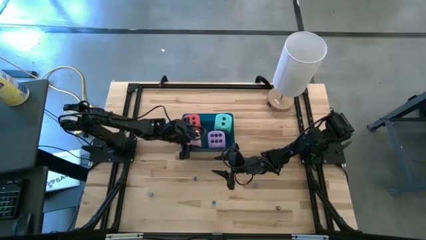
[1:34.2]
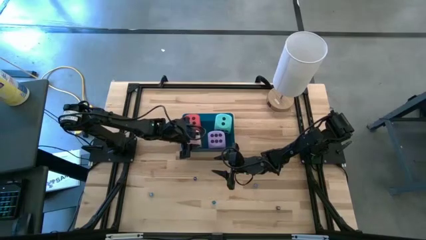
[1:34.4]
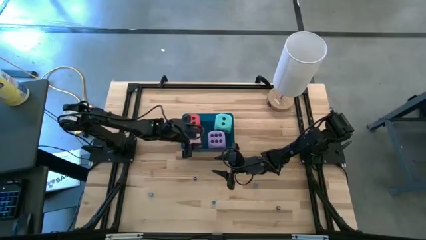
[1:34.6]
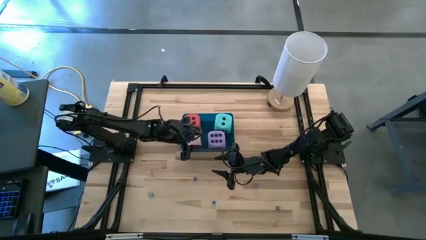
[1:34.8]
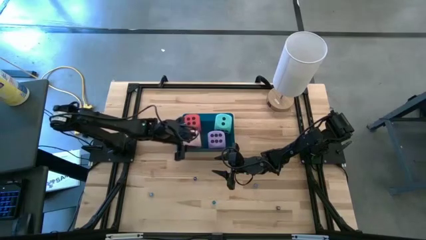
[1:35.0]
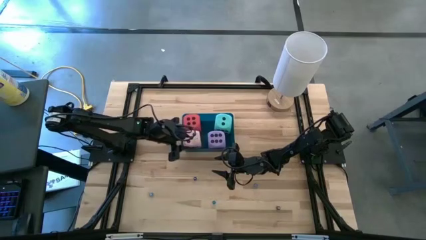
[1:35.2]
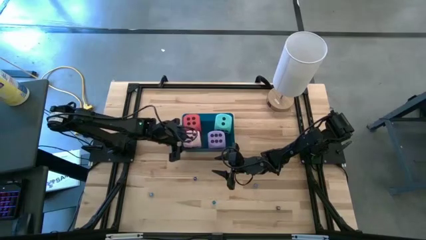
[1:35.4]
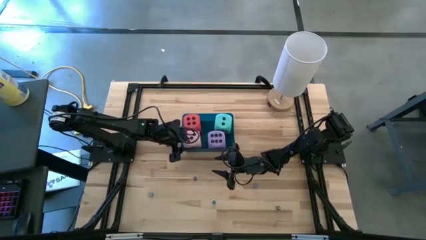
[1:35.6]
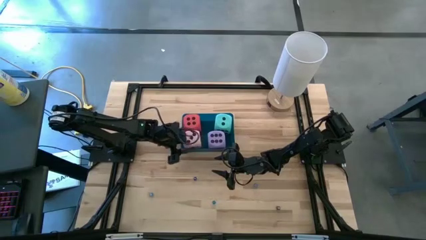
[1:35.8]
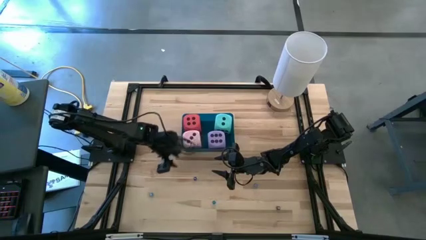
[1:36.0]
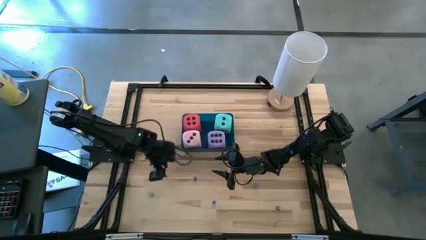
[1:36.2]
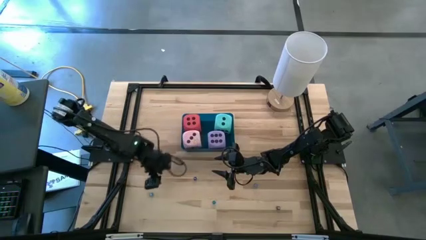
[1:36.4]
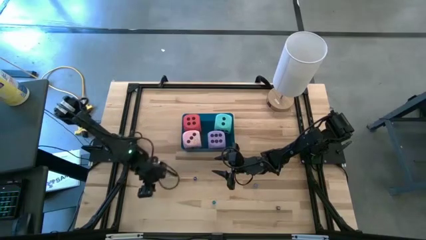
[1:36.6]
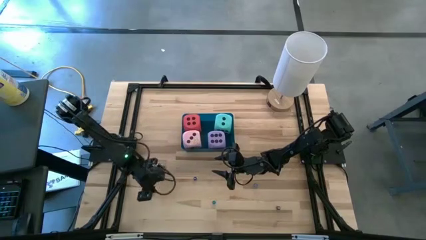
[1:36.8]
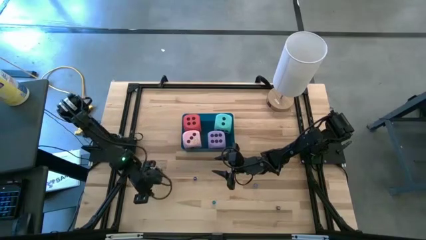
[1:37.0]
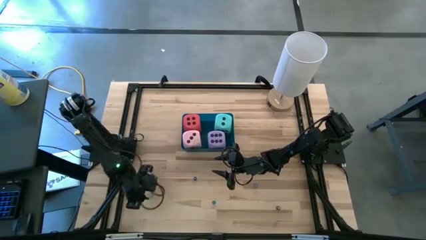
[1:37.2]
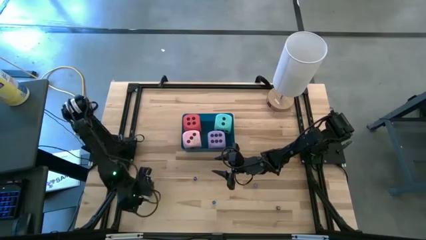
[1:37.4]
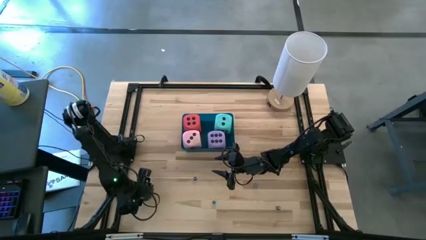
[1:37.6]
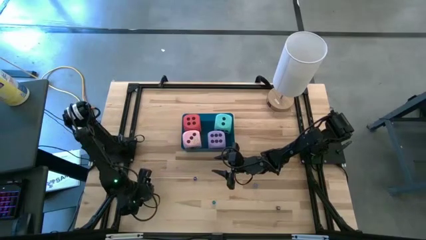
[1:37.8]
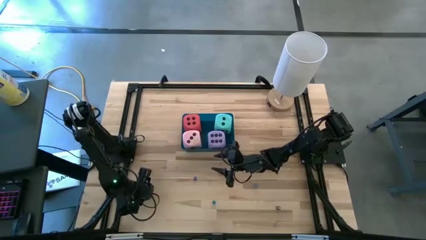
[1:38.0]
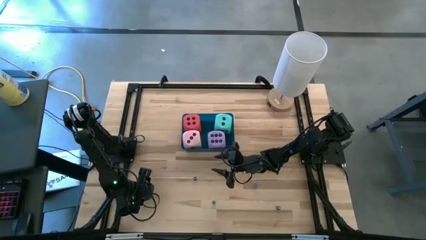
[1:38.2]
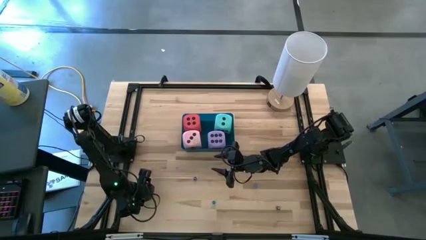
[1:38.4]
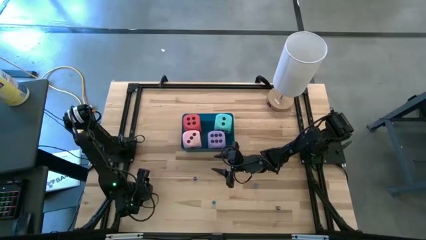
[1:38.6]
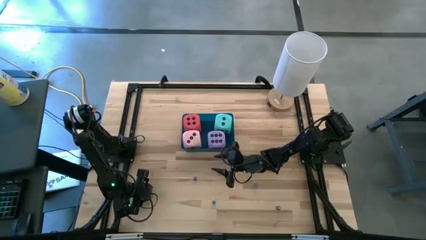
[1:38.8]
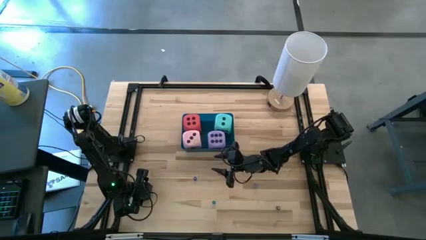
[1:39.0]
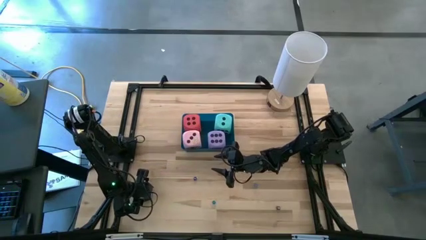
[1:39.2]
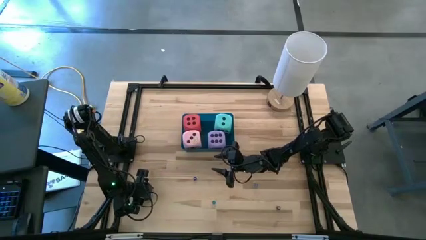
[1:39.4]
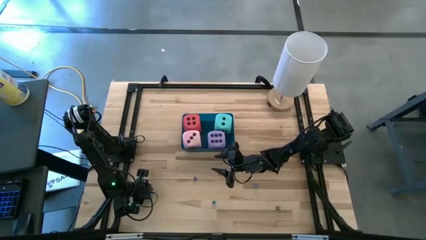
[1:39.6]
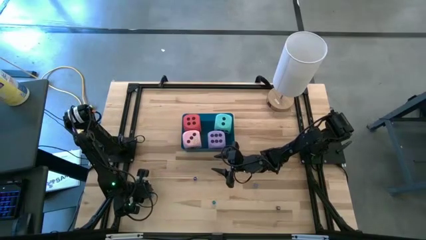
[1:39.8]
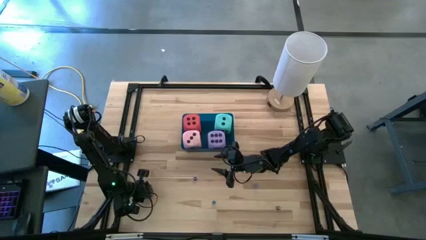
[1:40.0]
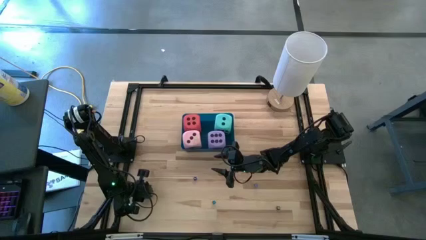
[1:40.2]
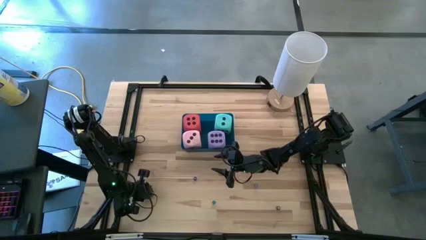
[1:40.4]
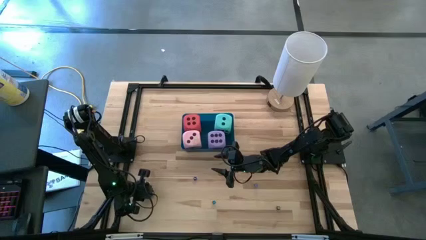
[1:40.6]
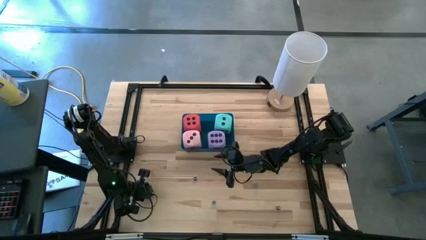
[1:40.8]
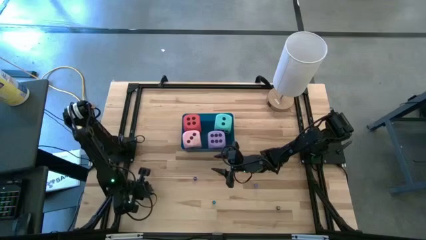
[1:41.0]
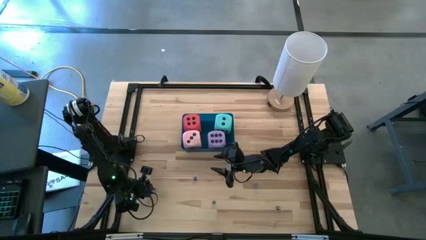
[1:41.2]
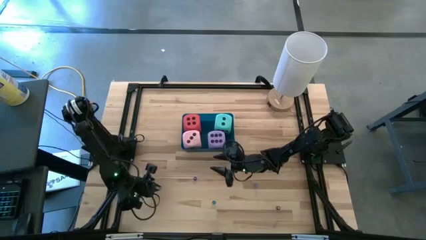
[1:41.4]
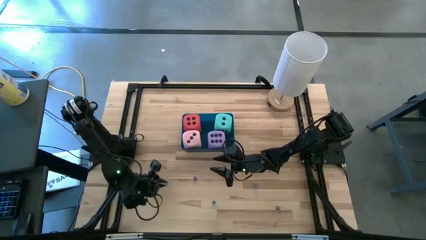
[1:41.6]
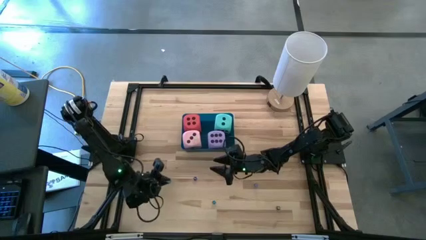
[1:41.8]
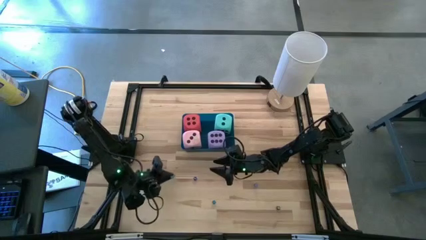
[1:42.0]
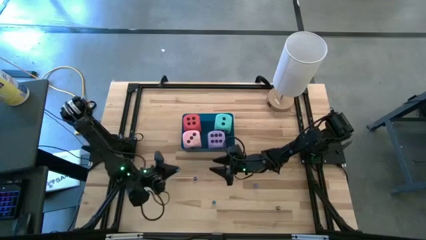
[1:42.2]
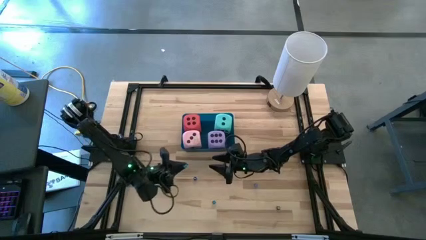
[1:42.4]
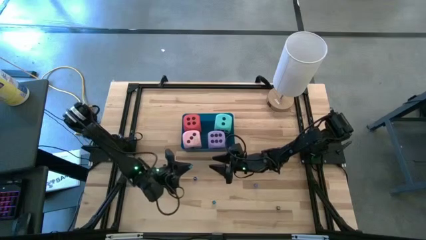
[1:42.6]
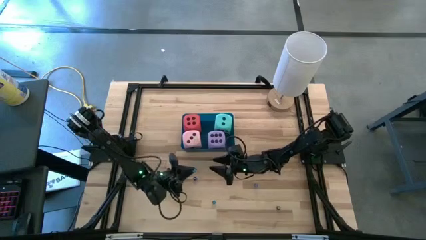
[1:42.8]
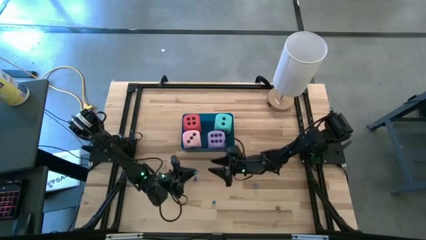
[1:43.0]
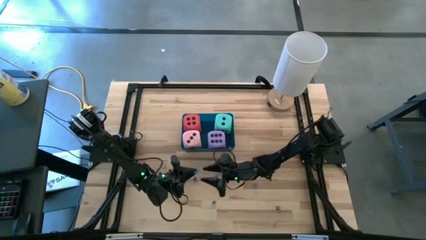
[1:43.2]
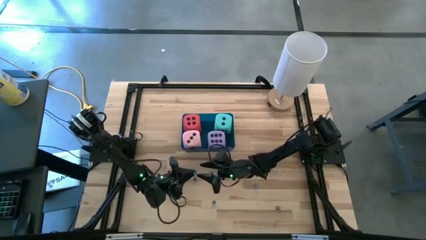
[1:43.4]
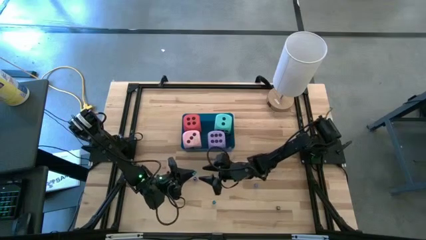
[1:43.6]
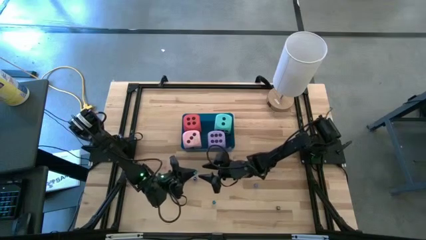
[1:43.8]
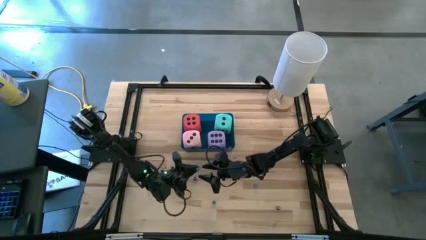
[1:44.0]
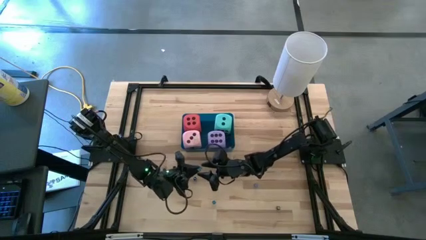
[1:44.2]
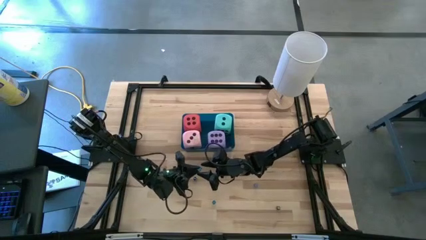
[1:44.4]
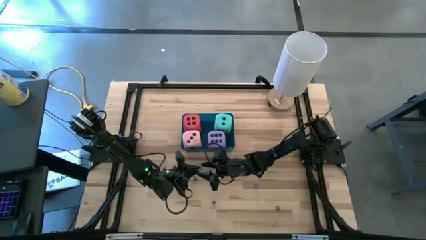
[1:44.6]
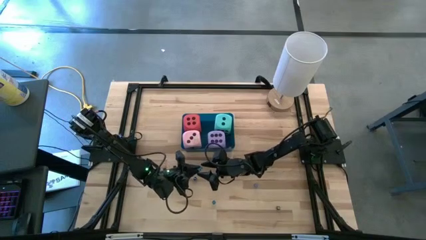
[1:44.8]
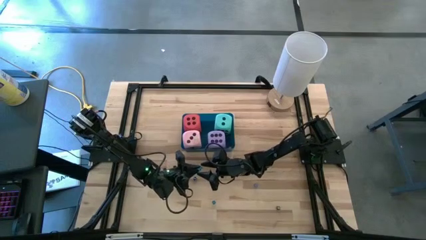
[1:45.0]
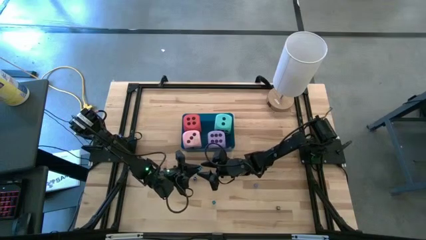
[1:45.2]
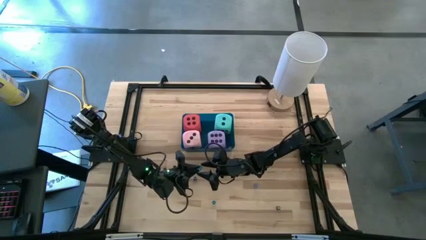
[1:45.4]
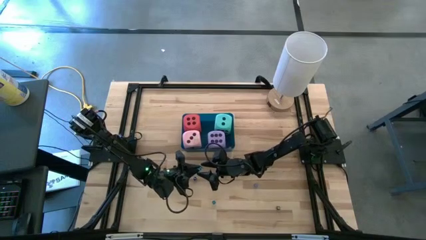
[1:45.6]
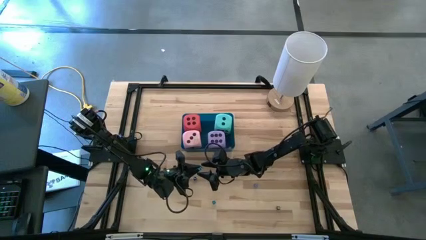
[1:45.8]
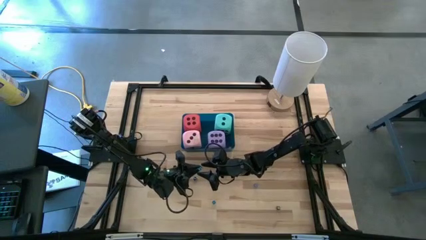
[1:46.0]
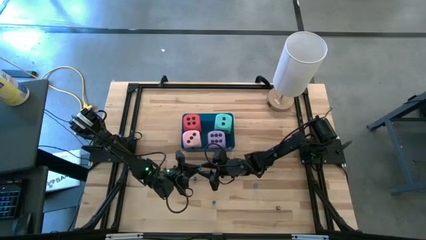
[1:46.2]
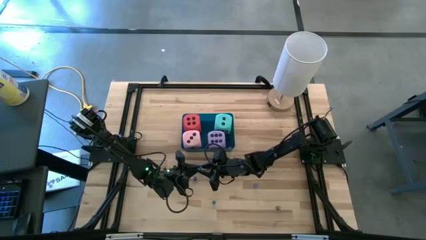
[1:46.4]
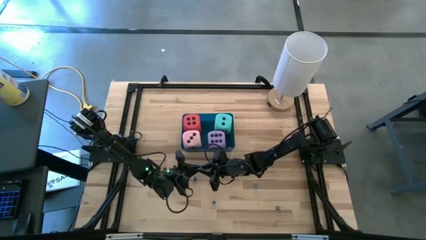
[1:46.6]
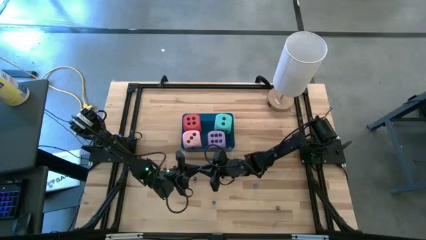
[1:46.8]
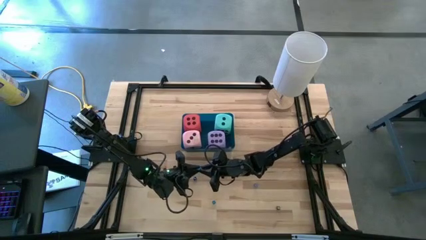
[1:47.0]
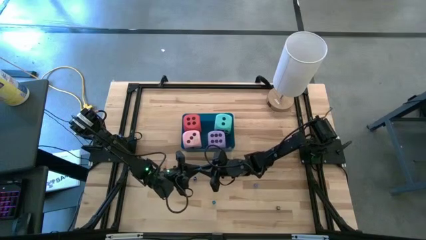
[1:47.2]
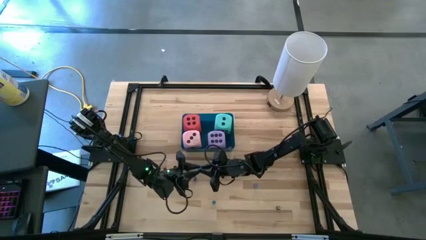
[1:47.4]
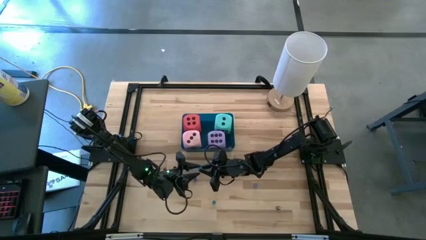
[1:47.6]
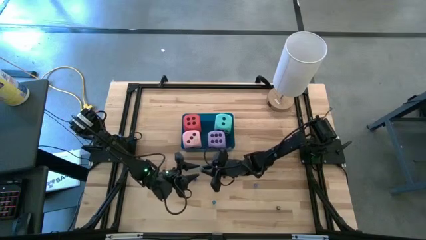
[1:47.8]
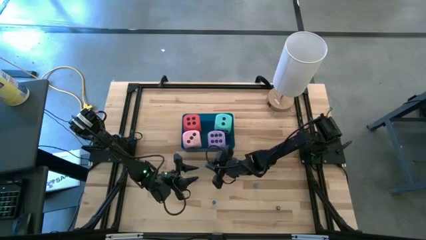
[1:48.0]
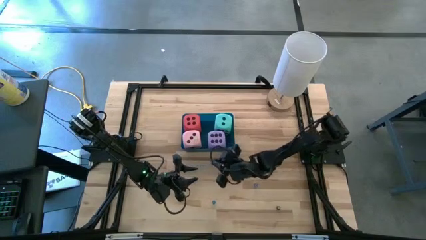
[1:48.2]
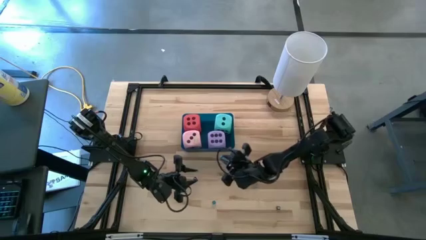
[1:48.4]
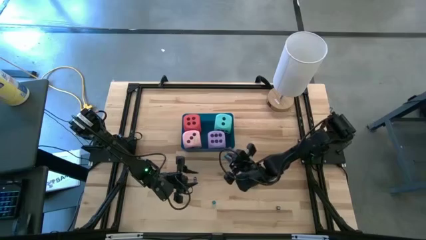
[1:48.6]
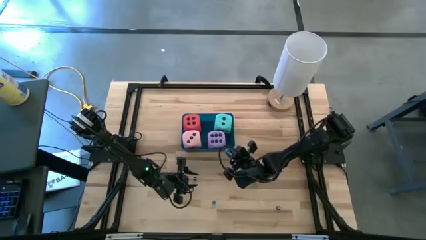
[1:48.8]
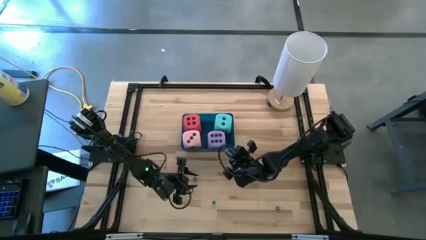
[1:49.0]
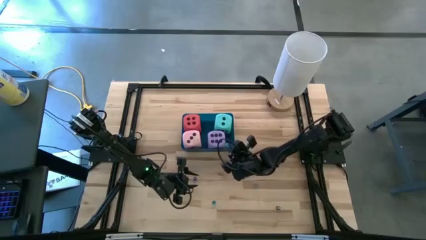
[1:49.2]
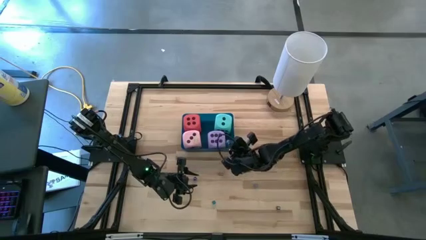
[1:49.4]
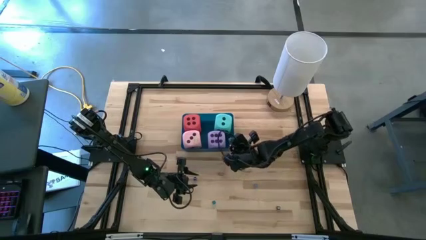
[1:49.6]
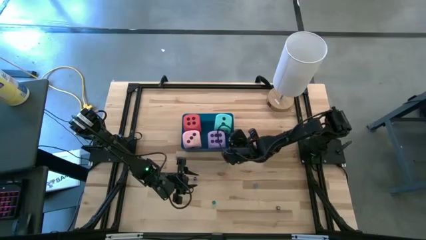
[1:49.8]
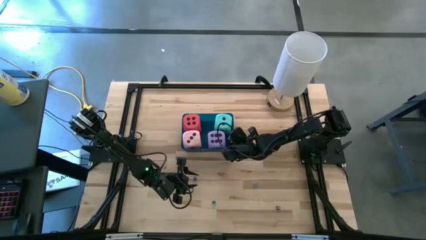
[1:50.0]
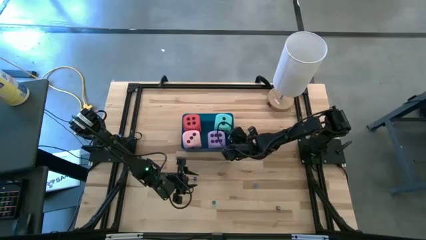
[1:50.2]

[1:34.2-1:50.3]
Task: Pick & Place Dice
Put the blue die into the blue bin
